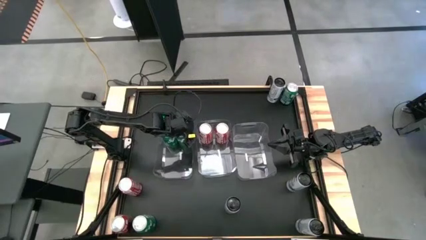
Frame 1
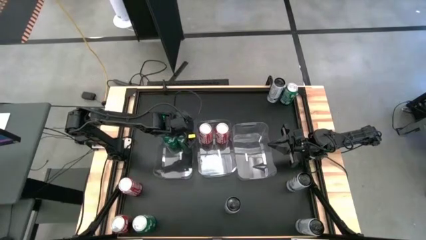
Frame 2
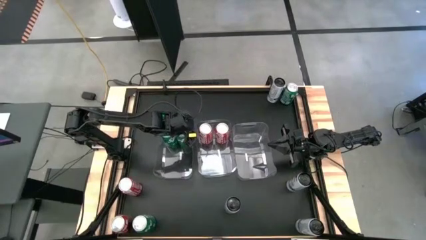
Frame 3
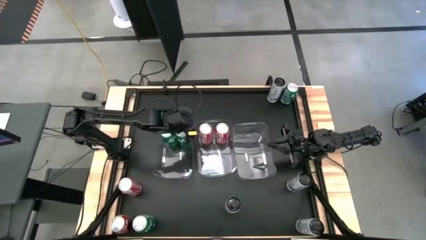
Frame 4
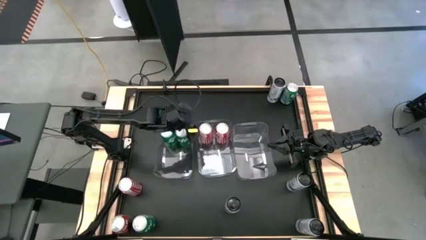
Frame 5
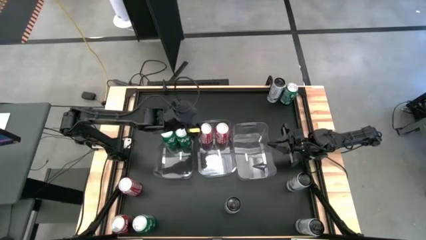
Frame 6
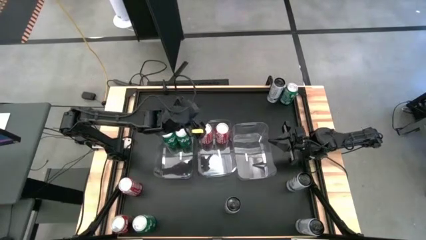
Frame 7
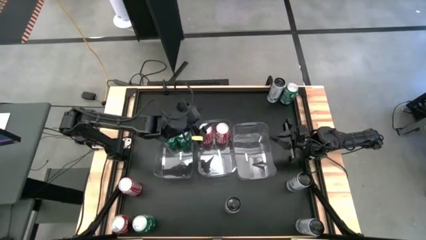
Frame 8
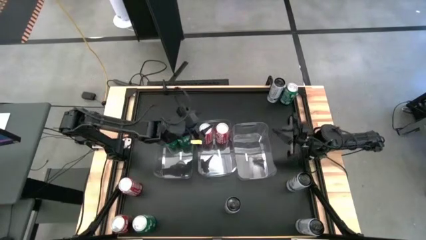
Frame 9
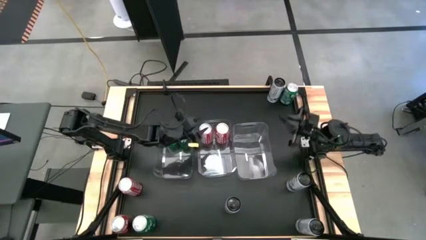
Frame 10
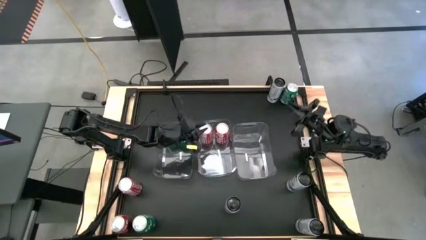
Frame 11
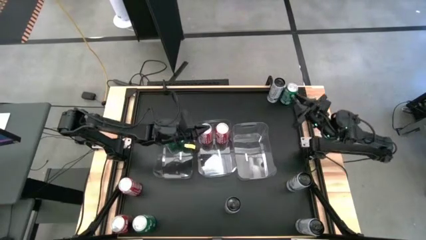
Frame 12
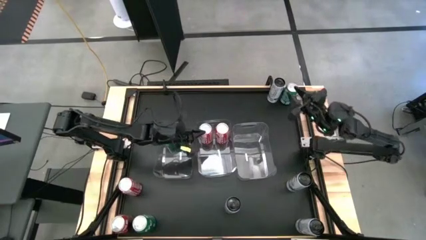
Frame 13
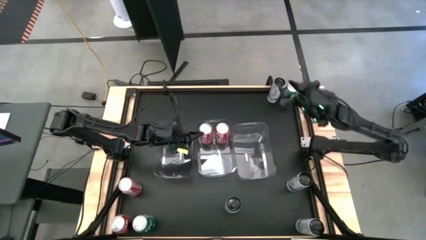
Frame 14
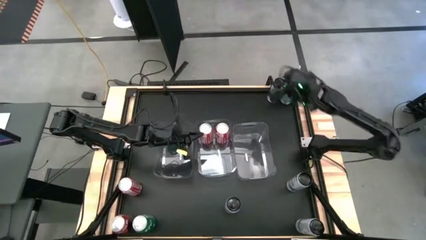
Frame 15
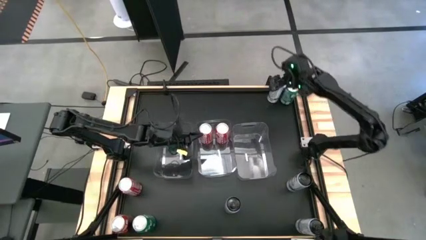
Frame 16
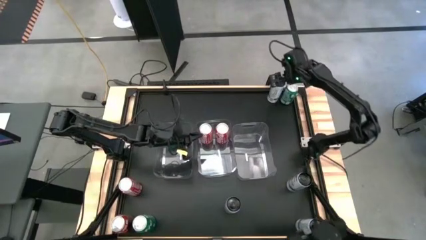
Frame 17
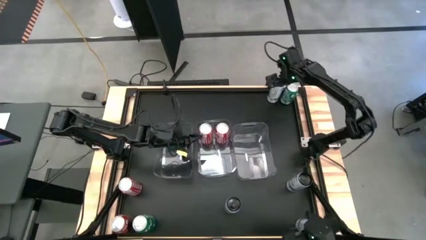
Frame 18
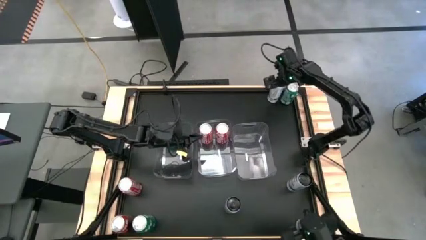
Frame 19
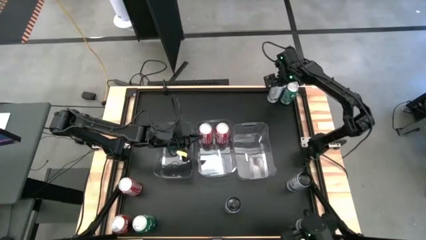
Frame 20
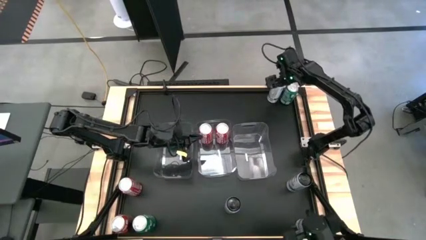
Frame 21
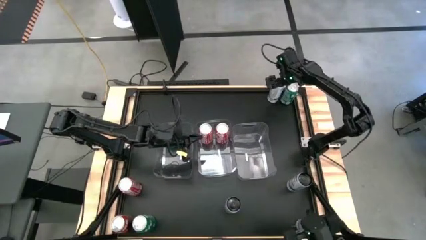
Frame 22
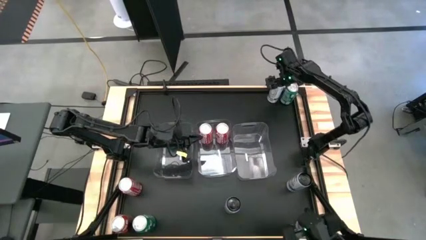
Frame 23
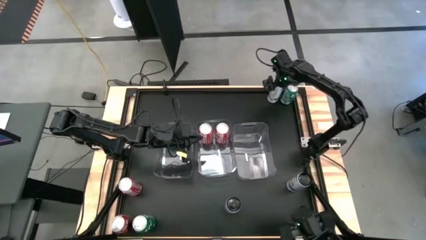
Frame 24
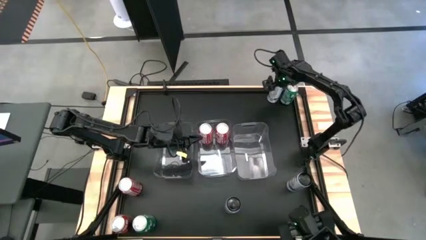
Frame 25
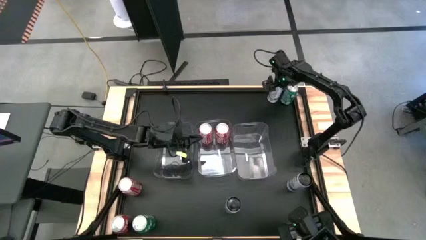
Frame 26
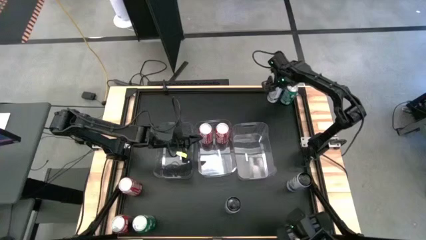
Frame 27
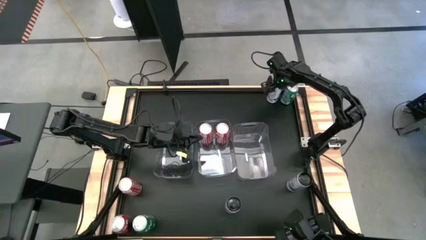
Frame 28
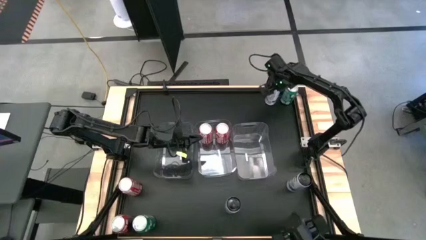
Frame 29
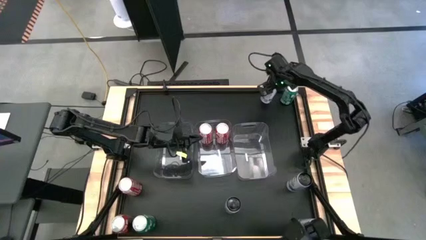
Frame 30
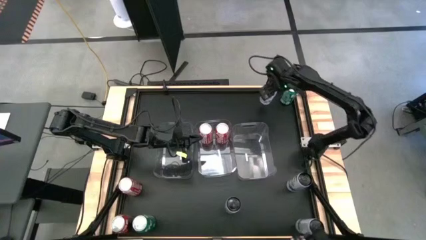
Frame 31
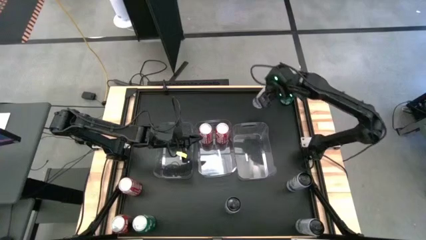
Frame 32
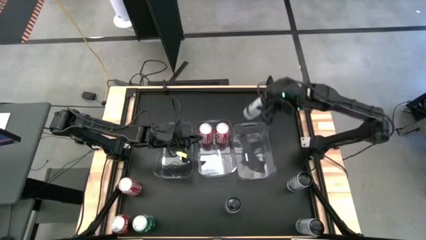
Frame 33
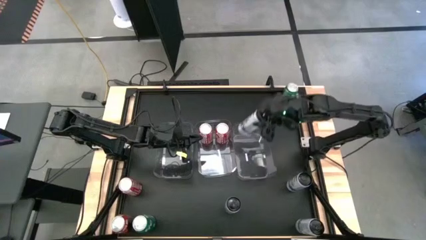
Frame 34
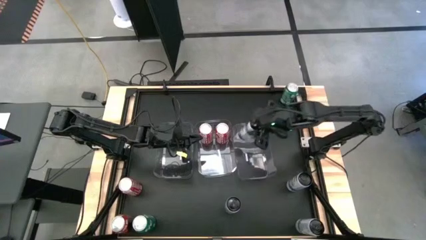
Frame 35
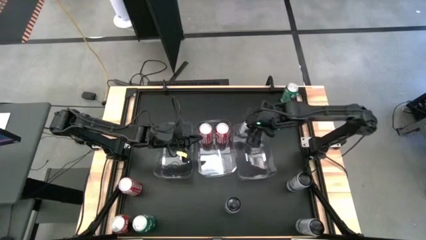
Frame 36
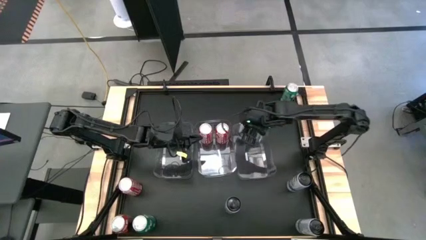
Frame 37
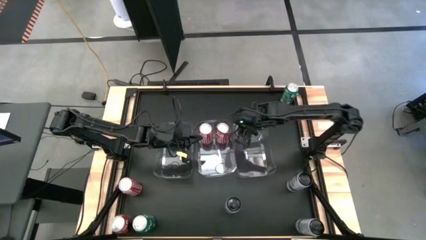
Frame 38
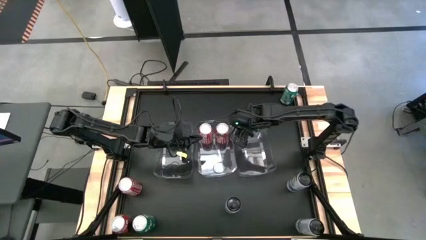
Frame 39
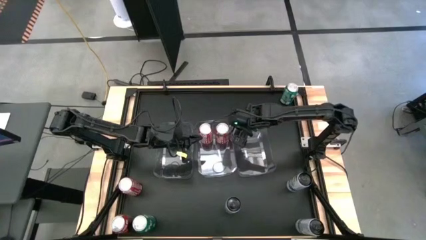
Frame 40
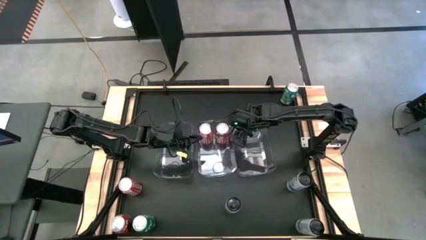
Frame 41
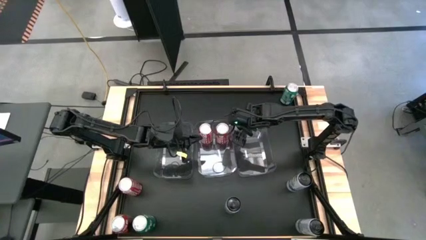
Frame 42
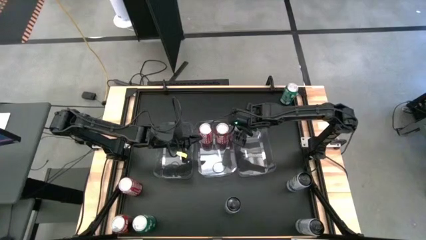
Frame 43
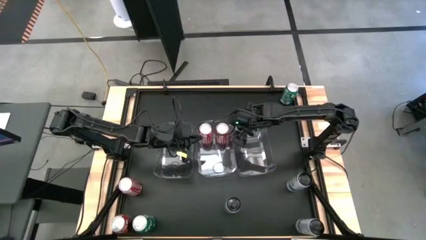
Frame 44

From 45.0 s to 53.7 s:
Task: Sort soda cans
Put the top white-blue soda can into the right transparent bin

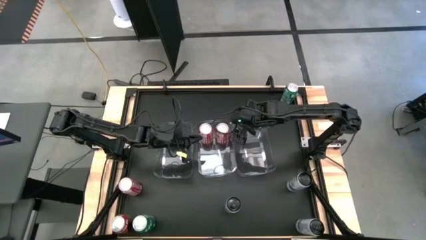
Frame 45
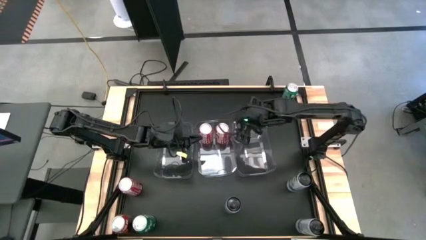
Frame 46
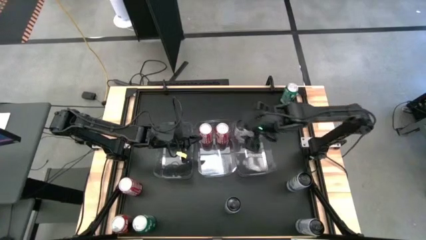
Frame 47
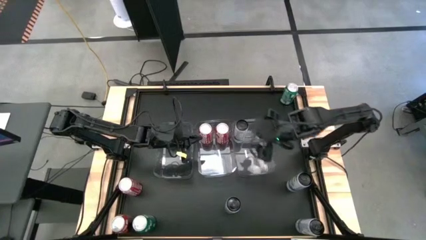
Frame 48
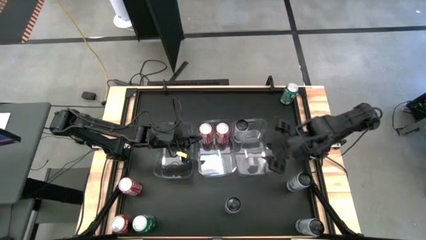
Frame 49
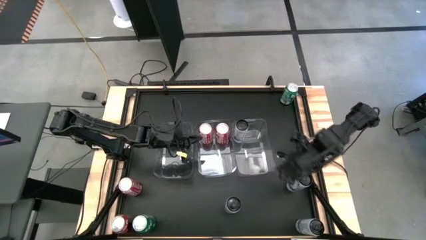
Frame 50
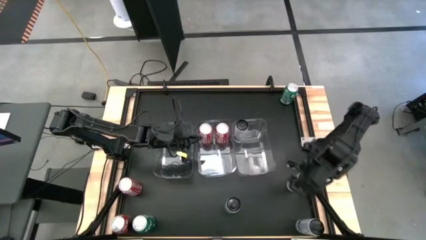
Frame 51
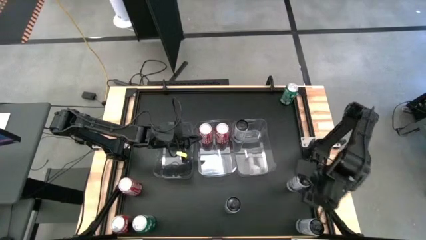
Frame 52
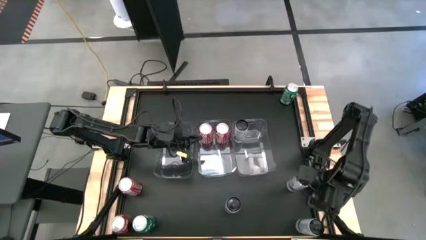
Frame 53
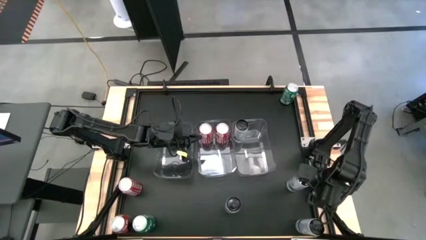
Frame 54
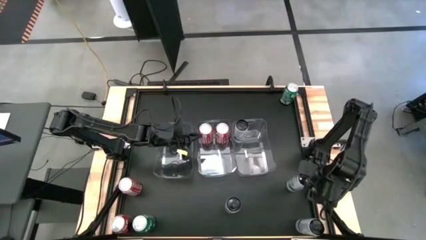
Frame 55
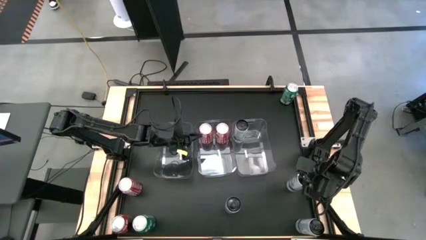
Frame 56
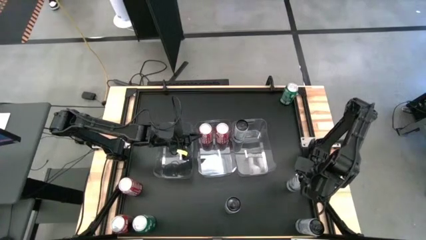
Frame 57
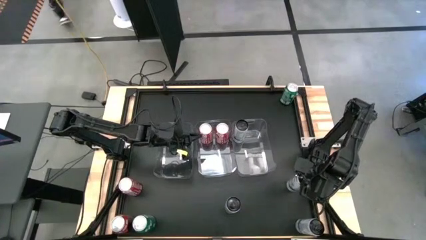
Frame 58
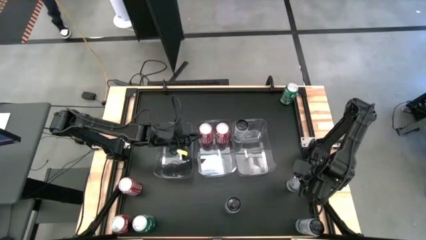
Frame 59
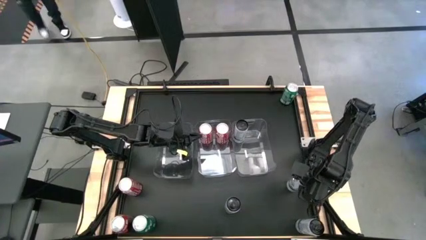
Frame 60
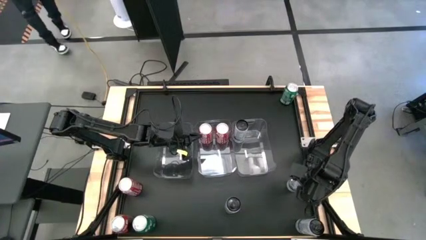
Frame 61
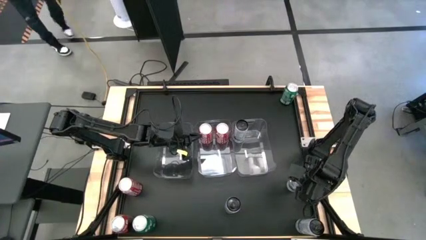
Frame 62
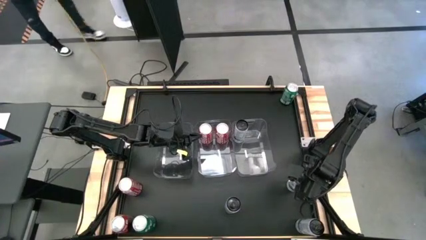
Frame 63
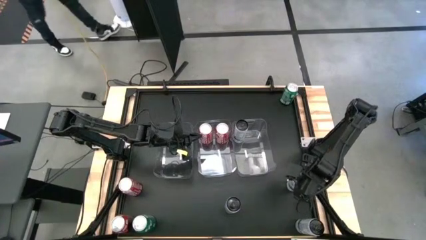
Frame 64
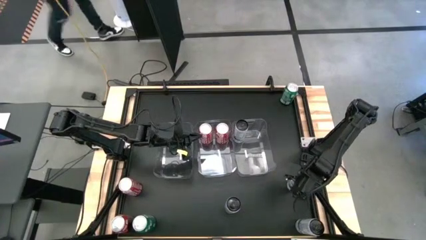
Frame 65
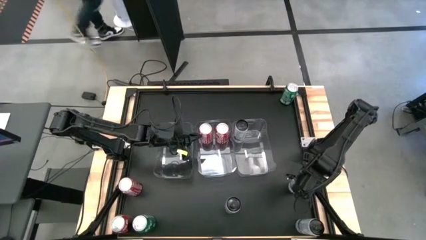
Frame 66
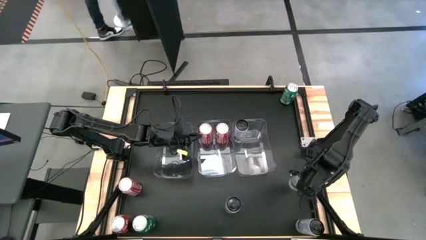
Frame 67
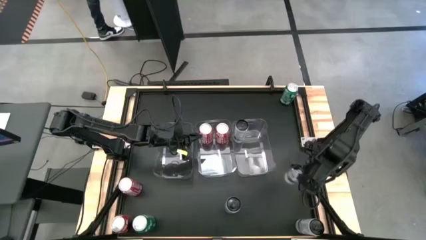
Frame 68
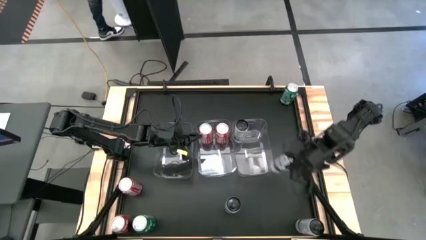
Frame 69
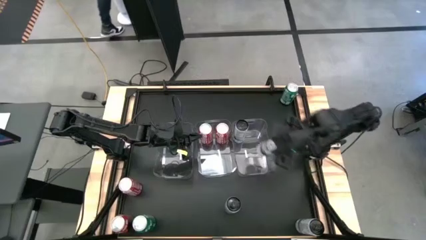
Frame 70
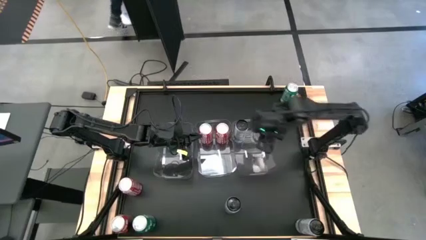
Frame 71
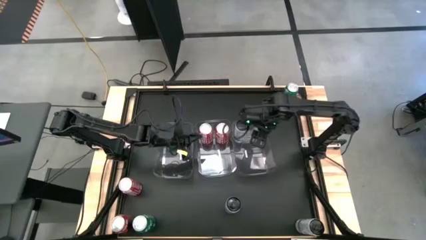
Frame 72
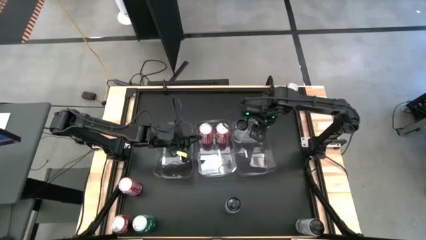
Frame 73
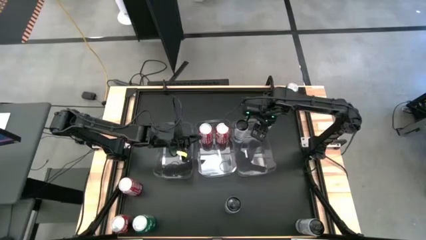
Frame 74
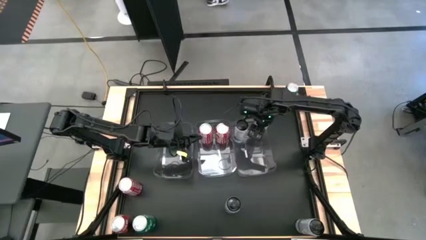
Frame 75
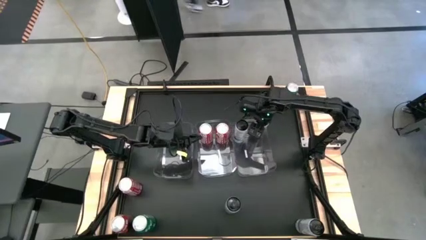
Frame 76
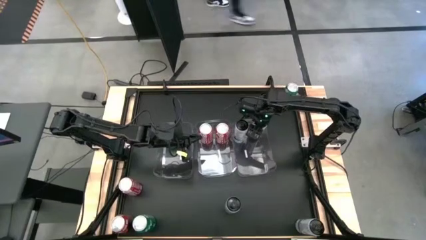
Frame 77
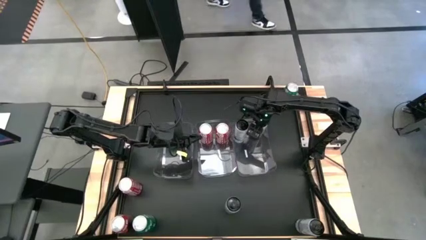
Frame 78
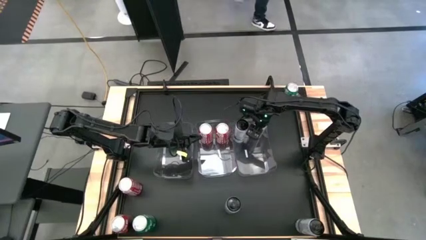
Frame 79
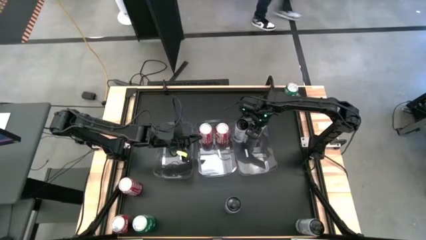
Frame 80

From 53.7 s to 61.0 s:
Put the top white-blue soda can into the right transparent bin
